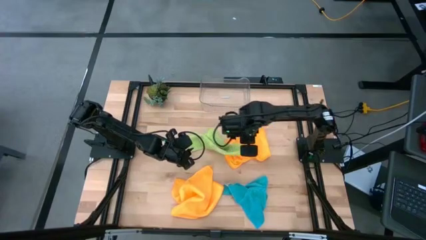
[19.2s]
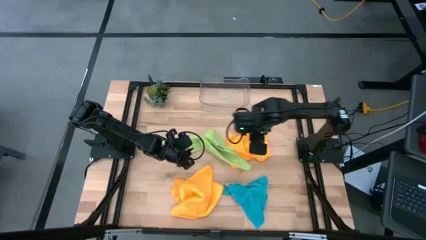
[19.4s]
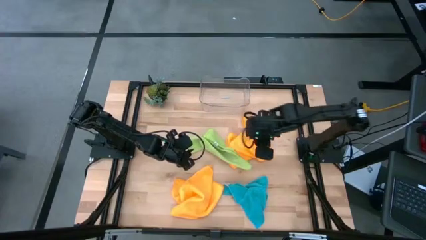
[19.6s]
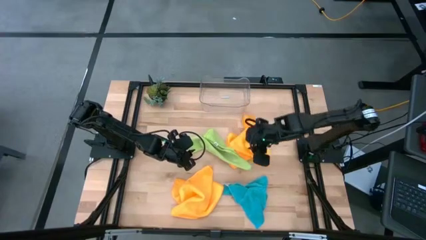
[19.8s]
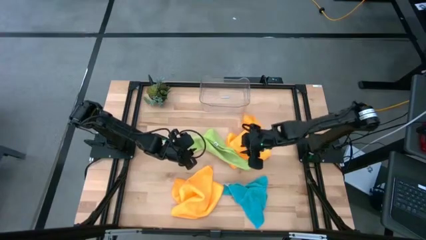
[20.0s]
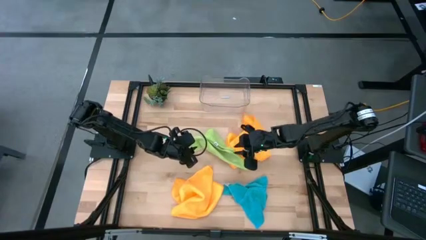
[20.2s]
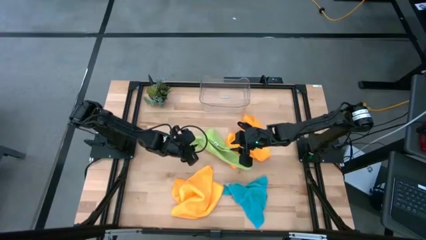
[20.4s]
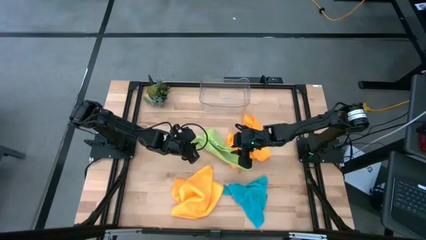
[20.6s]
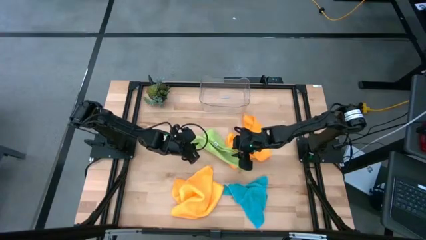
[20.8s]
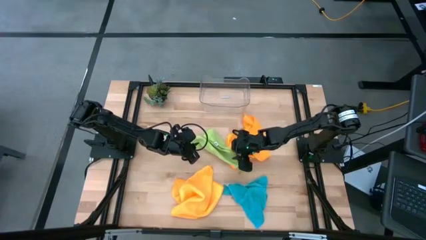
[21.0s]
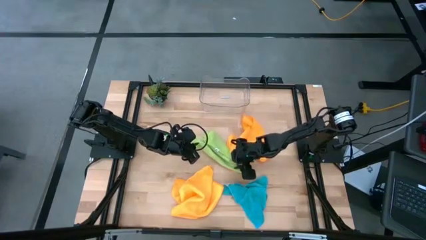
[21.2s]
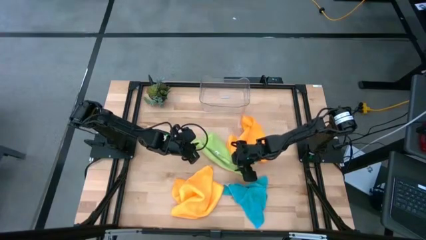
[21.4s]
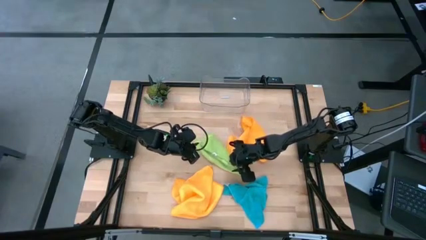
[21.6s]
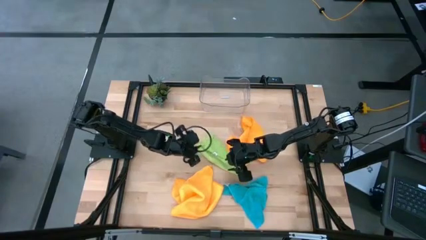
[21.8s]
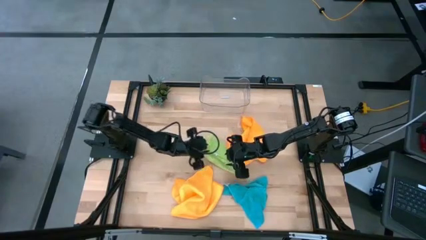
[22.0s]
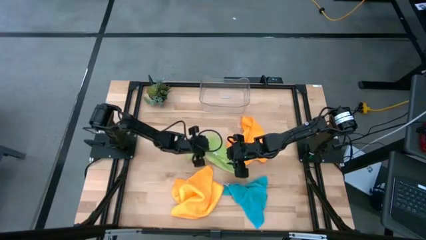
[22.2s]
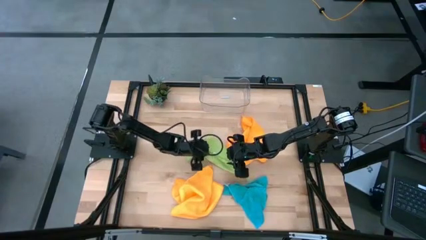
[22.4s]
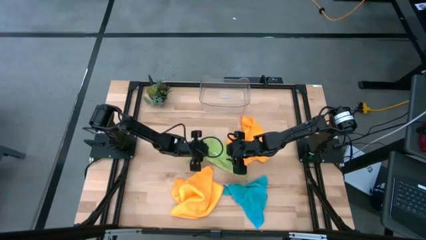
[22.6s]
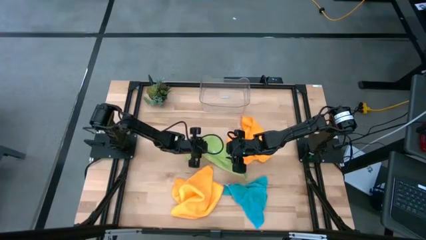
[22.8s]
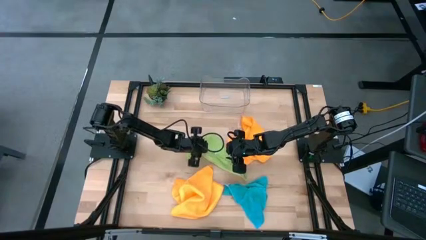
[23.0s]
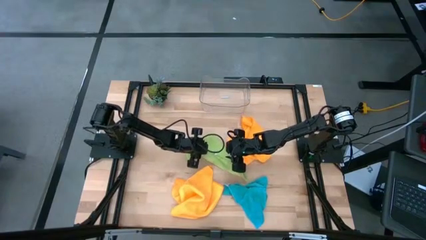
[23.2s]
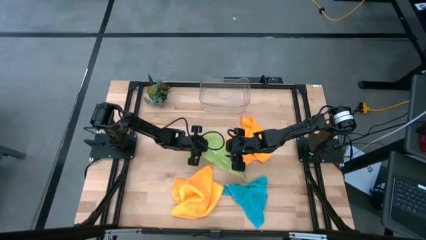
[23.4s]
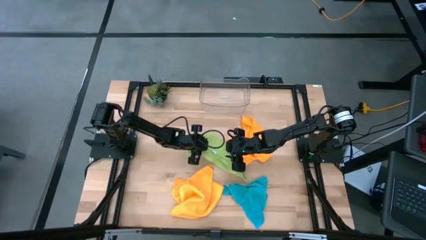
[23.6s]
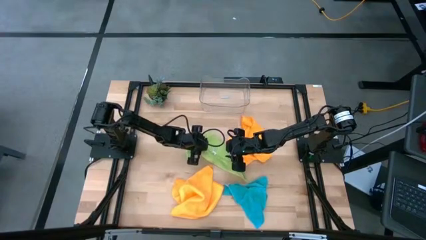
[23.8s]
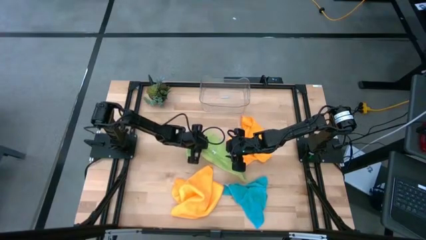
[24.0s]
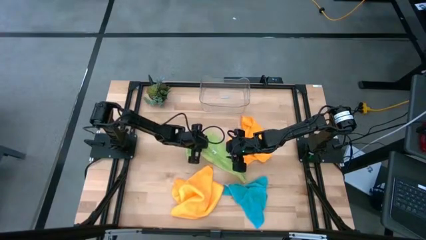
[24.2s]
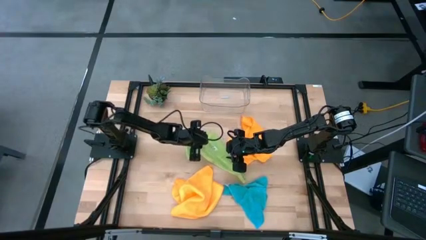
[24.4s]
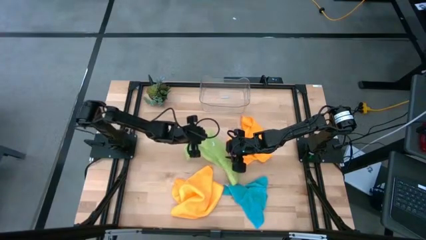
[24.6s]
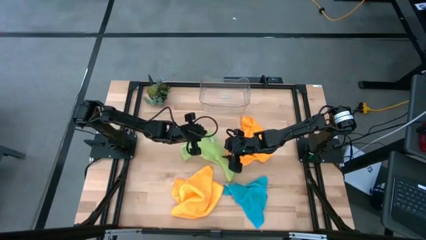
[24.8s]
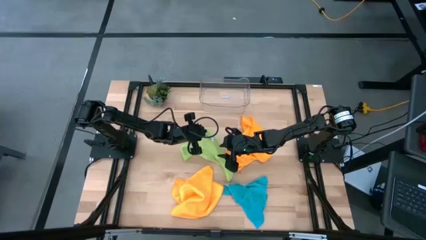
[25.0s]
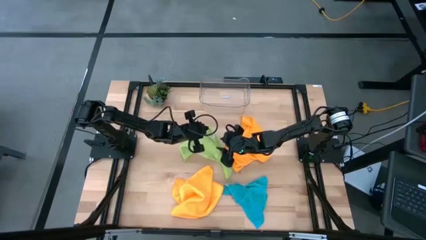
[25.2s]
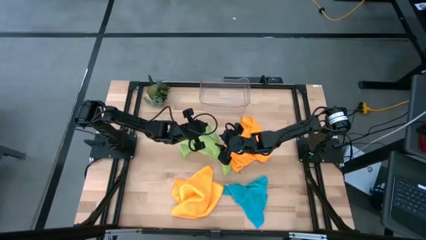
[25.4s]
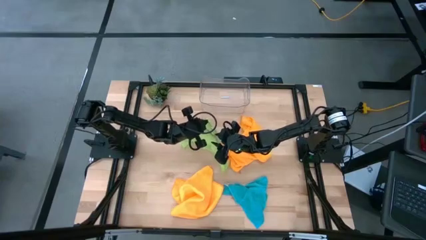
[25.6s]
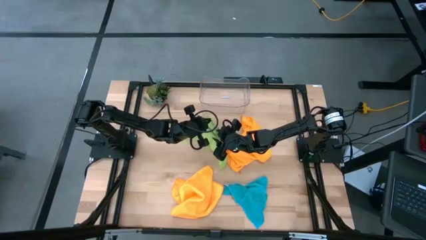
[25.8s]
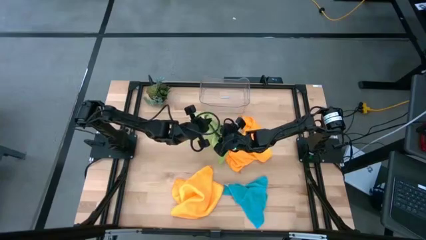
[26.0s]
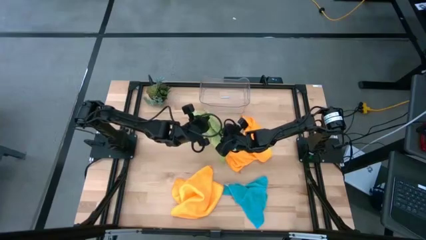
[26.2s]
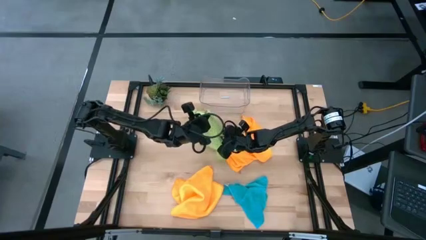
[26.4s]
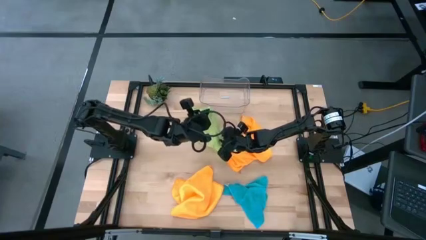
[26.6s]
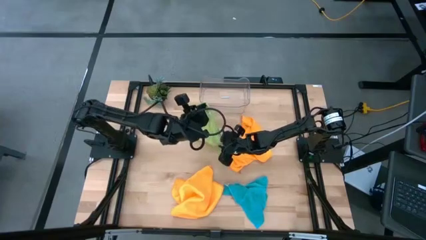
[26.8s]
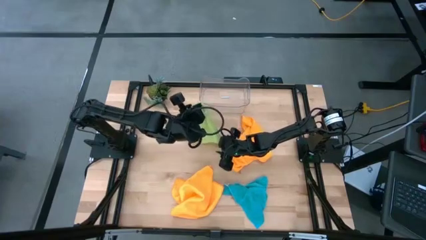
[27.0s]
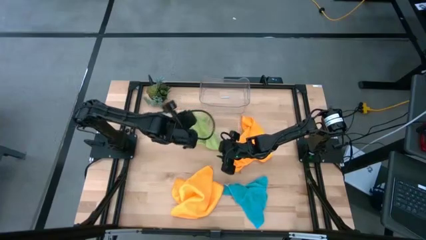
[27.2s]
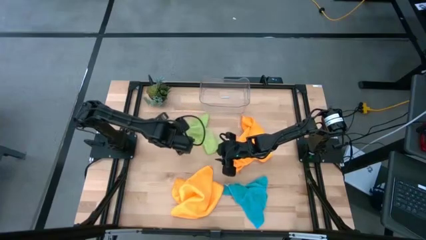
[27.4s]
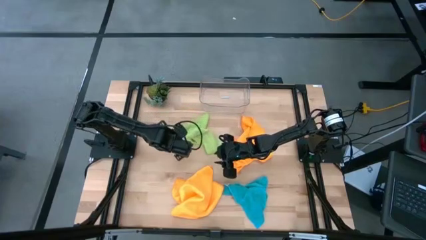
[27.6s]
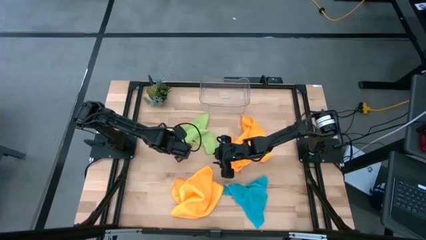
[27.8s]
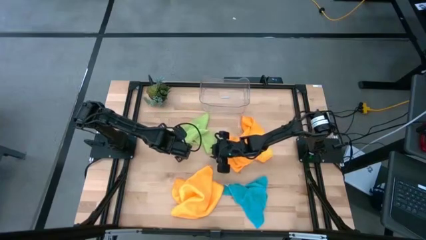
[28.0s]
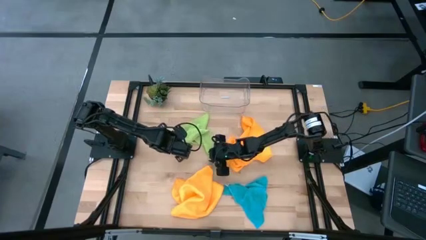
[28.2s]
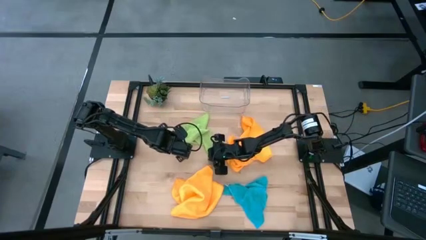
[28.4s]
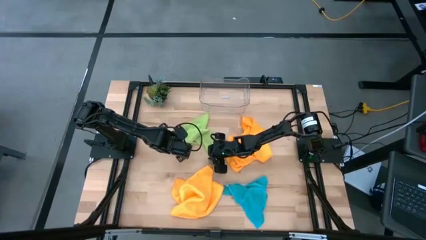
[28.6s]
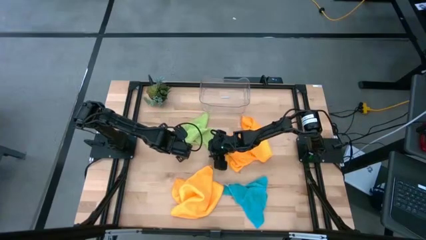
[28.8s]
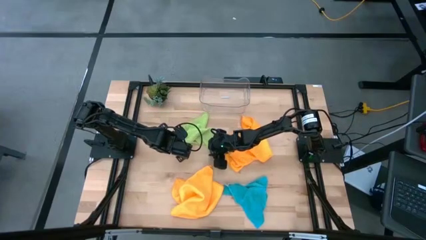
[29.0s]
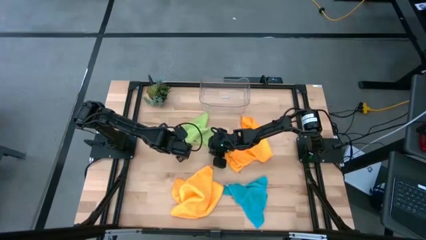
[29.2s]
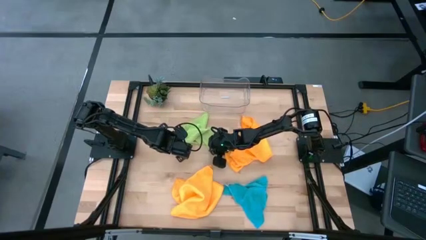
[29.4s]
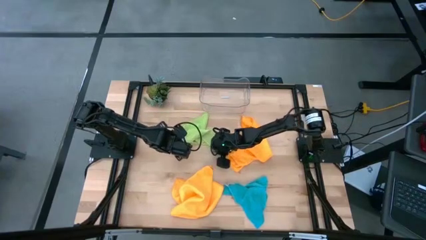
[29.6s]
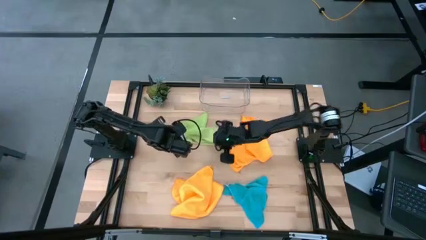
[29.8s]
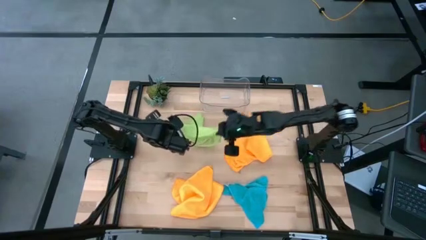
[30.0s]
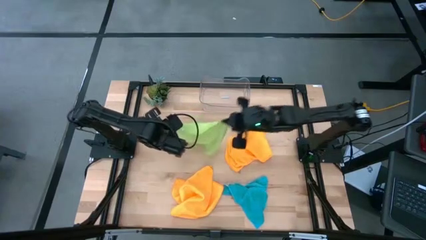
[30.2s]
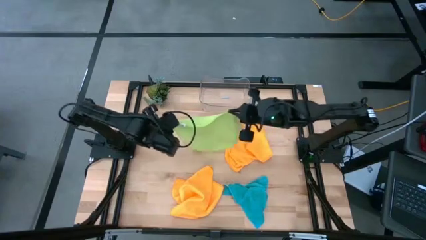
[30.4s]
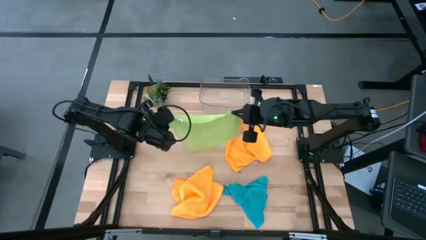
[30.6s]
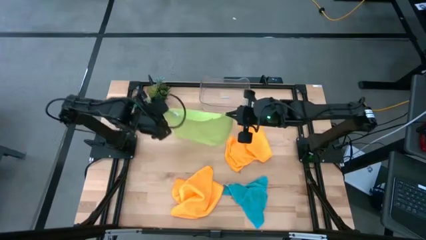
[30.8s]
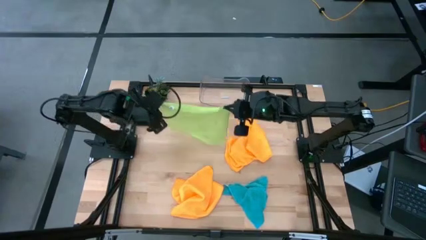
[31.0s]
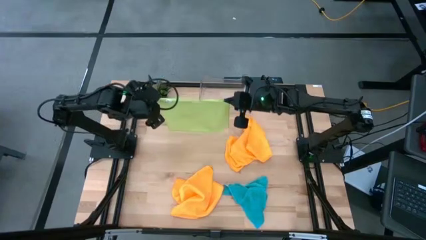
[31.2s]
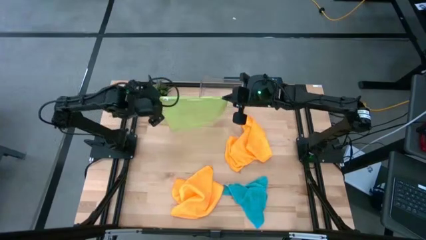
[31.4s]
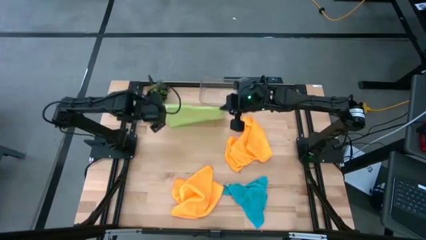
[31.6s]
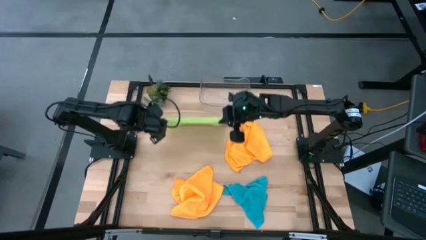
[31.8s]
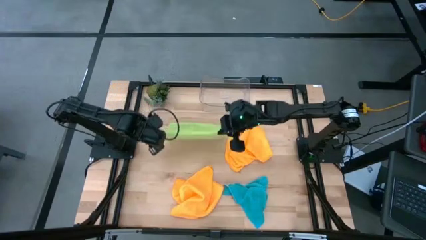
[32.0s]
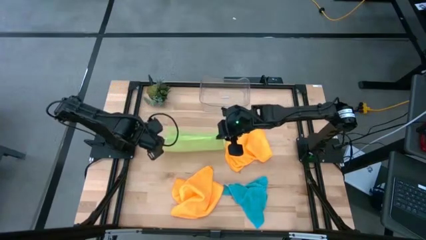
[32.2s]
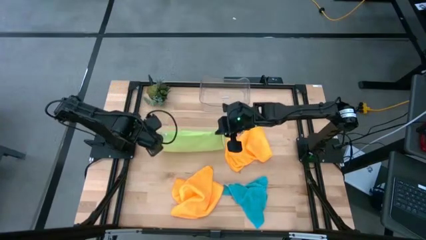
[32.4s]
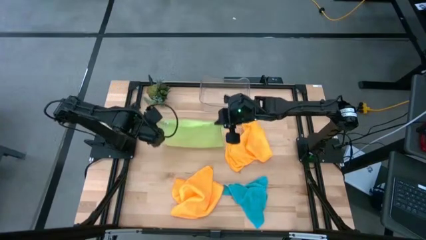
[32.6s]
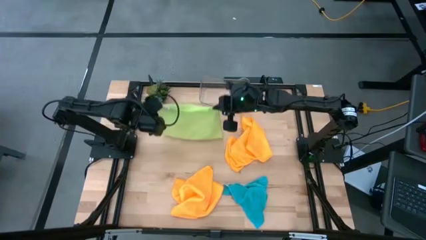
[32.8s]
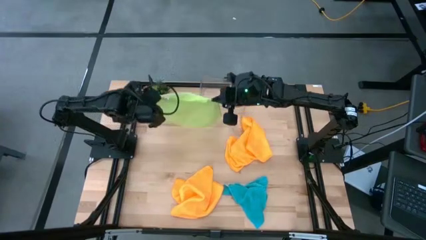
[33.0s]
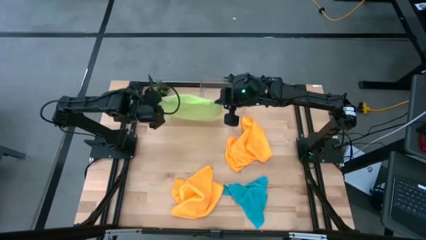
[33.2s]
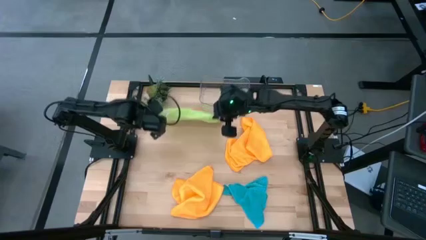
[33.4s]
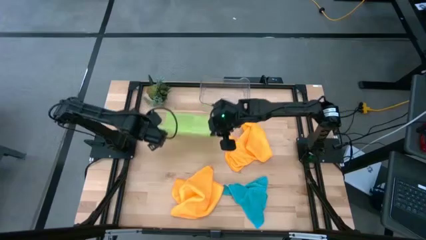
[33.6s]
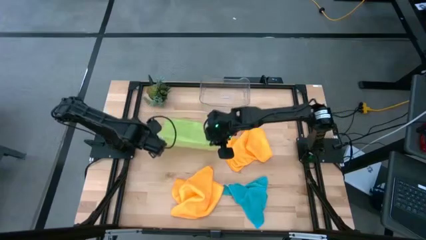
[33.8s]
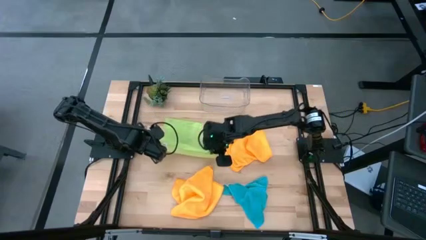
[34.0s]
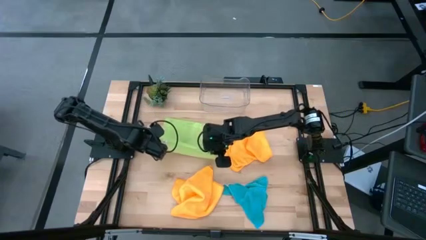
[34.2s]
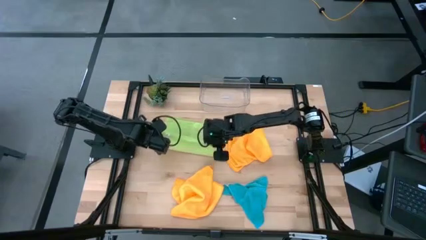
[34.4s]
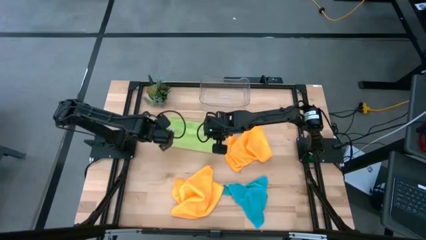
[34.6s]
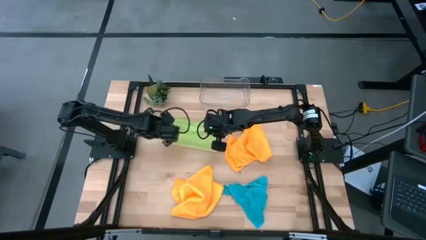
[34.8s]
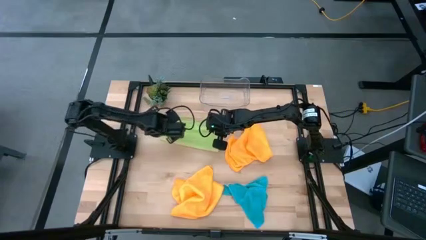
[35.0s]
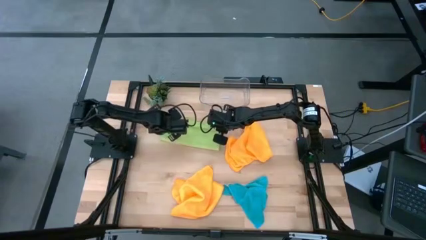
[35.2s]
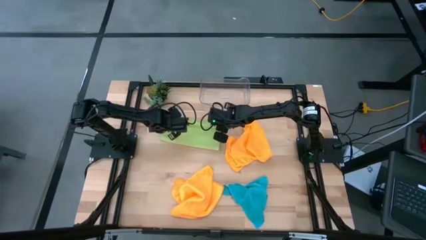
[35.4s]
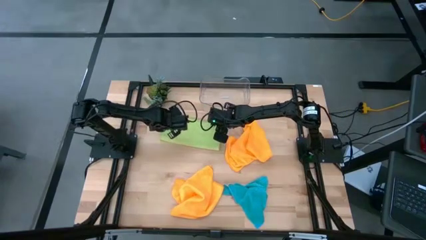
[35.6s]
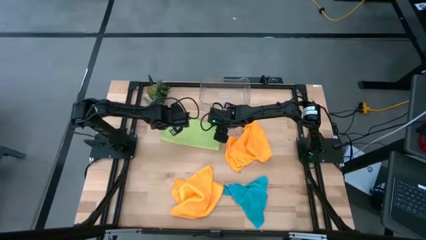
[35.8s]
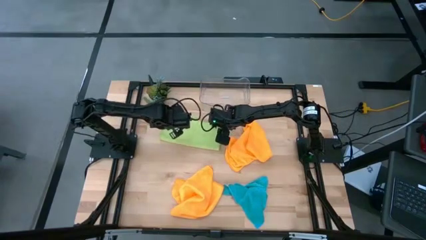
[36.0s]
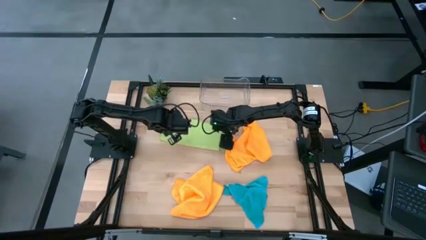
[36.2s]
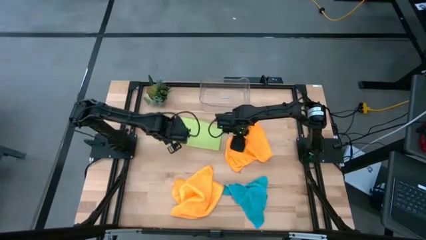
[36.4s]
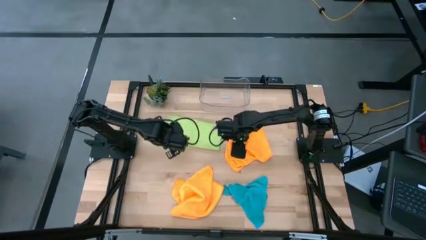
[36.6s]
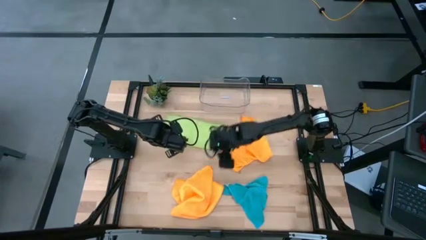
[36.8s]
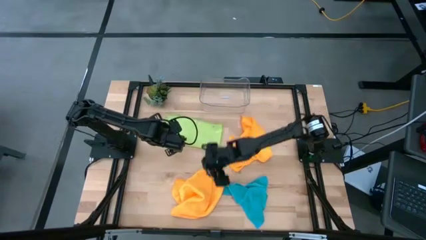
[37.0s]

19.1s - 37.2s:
Task: Fold microfiber towels
Fold the green microfiber cloth
